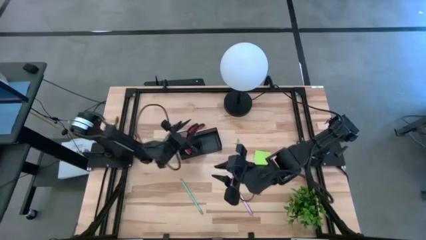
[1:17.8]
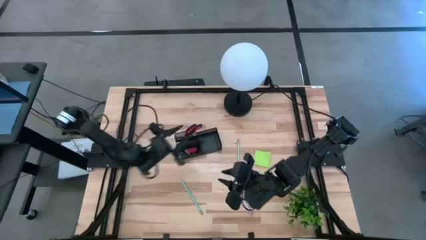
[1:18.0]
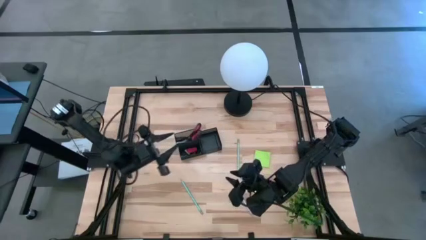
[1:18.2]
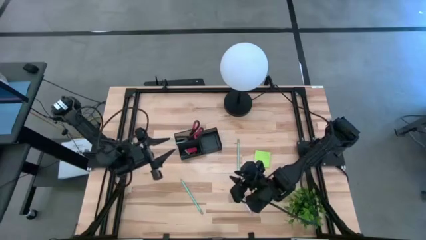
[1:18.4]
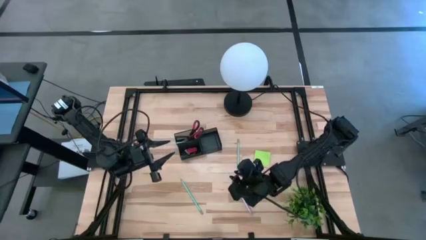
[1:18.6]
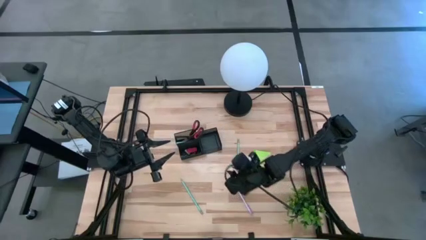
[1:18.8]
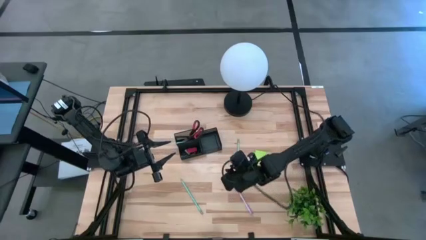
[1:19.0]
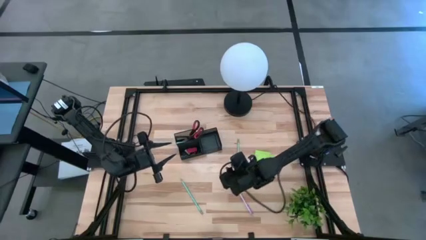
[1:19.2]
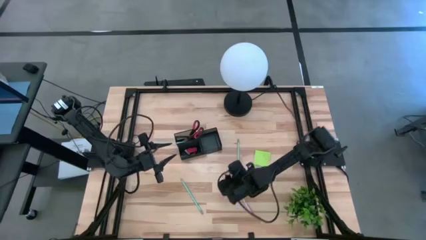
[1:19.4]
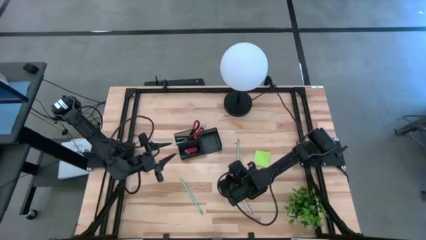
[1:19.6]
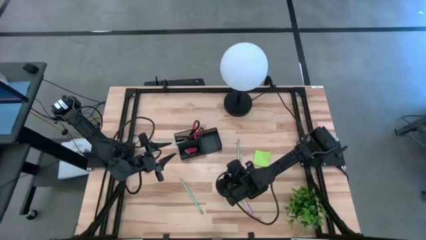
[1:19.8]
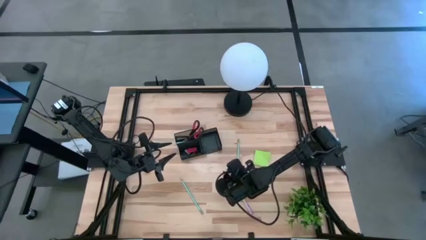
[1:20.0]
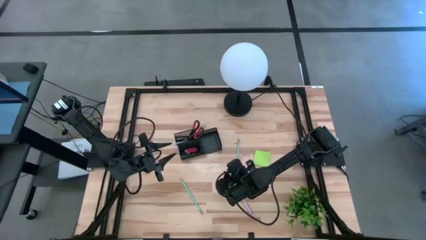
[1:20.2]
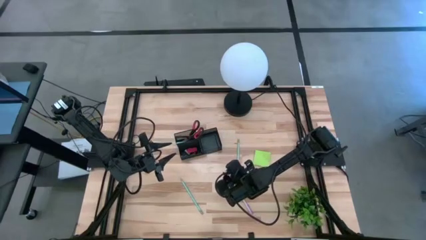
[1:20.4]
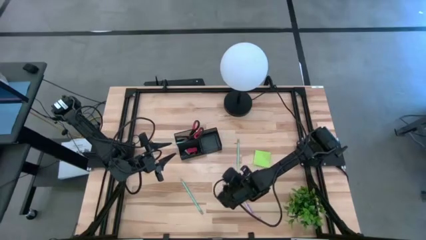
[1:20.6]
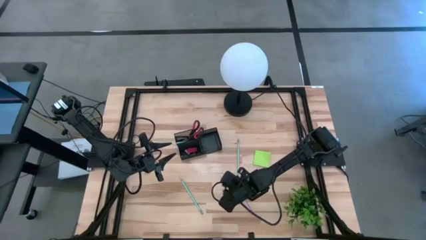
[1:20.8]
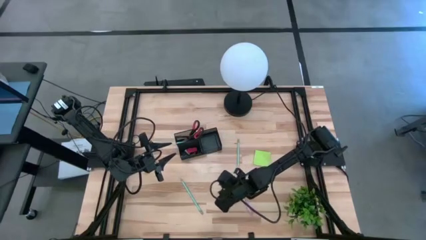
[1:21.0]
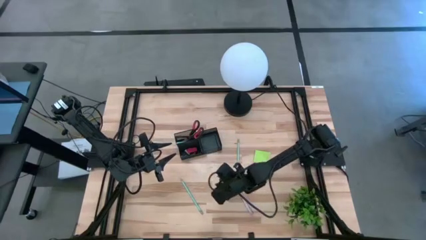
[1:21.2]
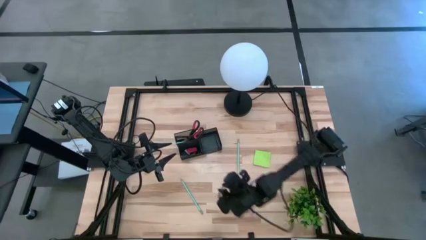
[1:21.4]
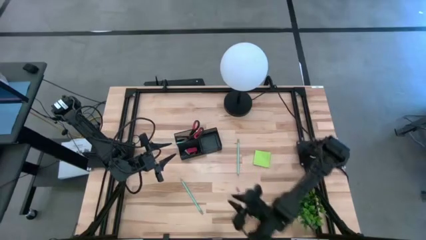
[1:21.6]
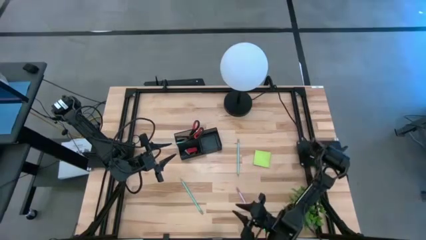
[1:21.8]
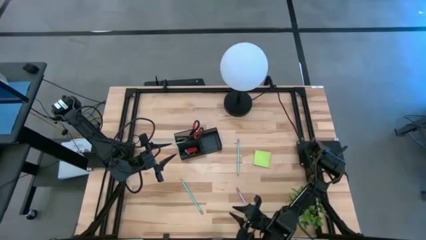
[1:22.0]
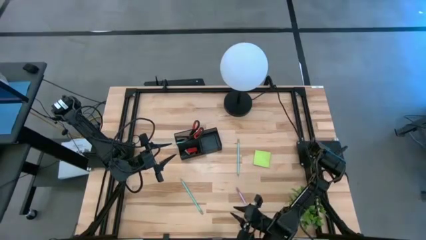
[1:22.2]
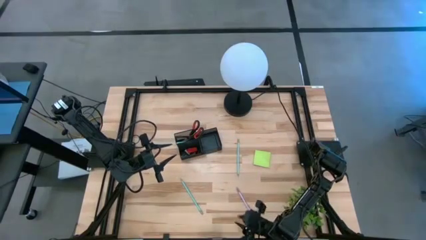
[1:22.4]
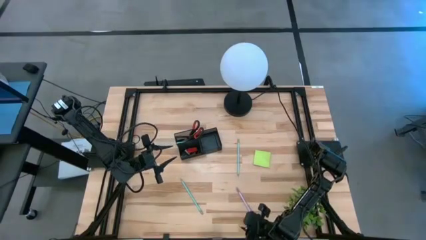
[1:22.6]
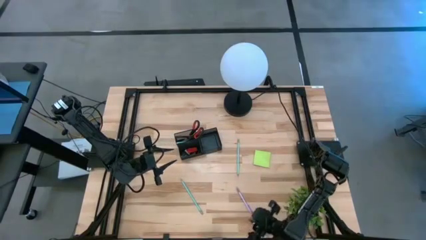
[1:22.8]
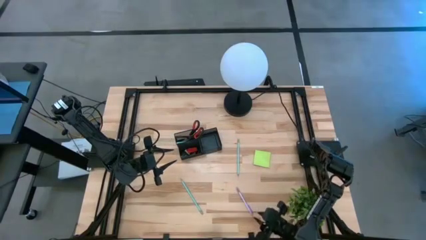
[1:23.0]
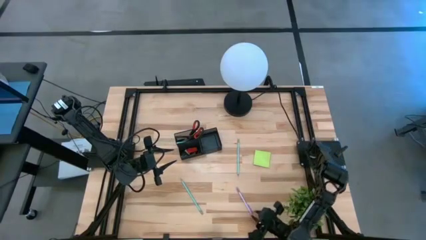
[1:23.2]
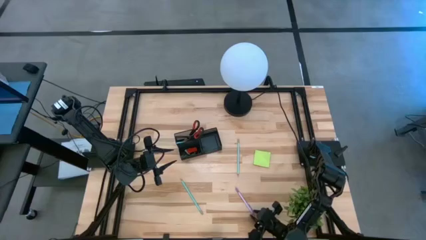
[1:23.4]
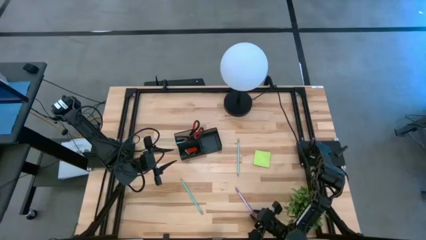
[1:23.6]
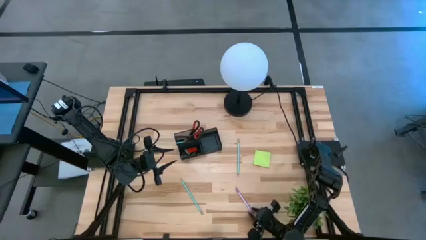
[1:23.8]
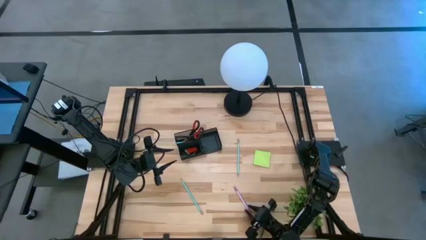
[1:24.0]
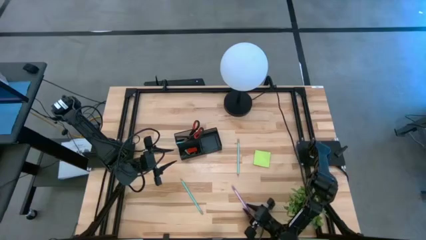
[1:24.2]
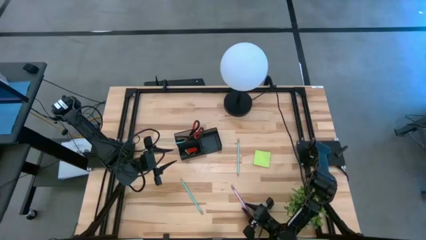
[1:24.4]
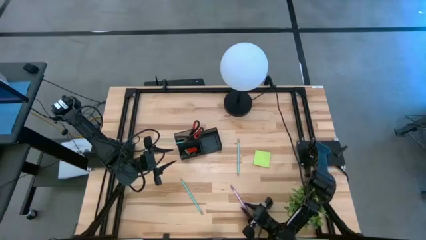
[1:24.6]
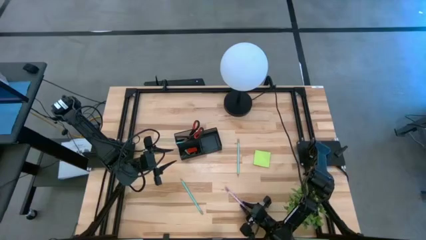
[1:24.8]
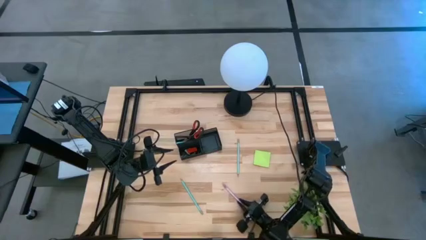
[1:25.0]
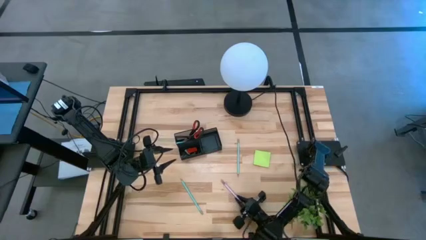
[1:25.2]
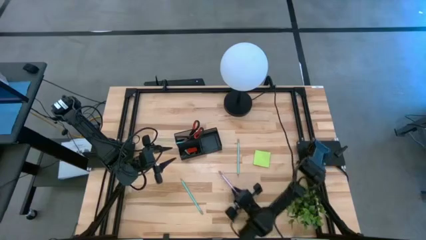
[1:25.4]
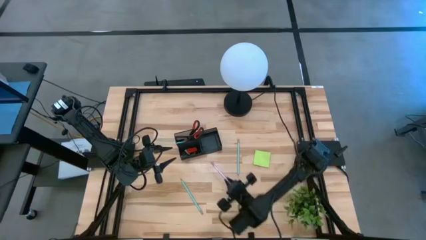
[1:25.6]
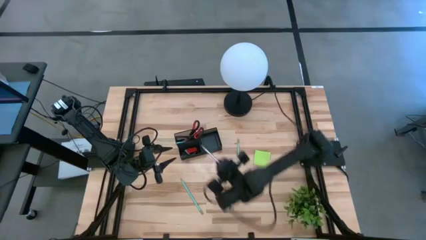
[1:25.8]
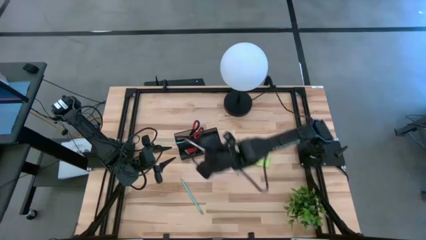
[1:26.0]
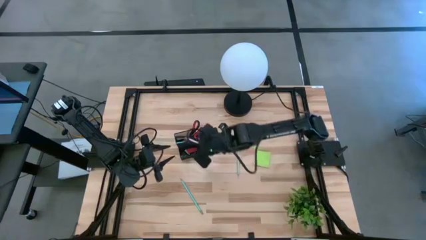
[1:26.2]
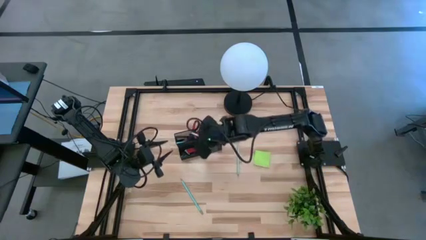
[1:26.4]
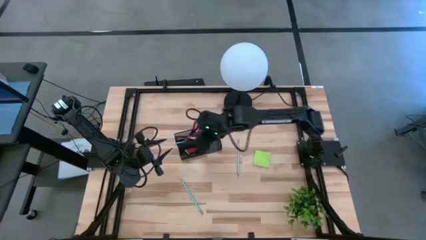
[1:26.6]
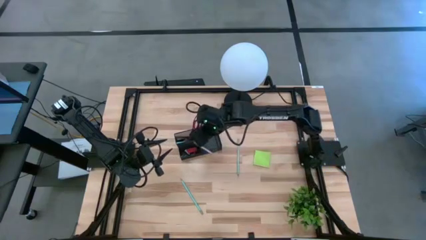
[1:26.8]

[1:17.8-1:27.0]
Task: Pick and place office supplies into organizer
Put the purple pen into the black desk organizer

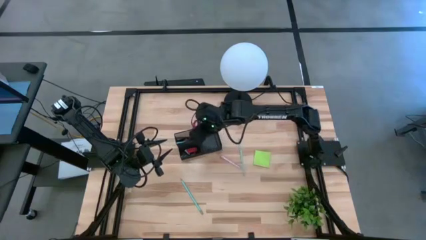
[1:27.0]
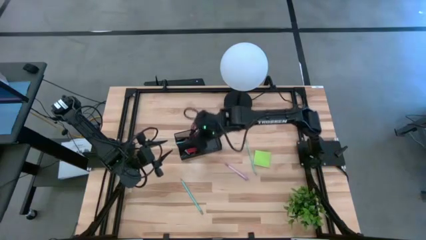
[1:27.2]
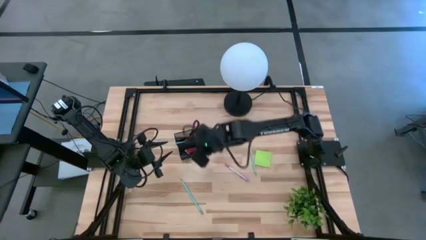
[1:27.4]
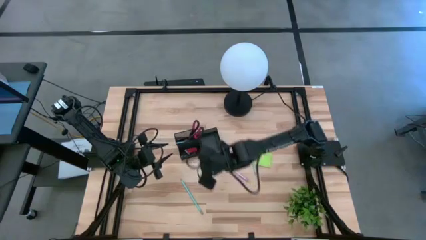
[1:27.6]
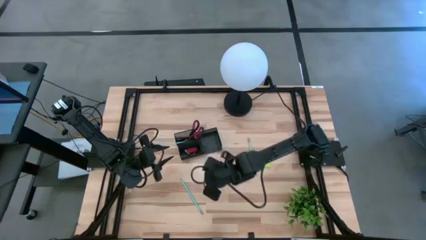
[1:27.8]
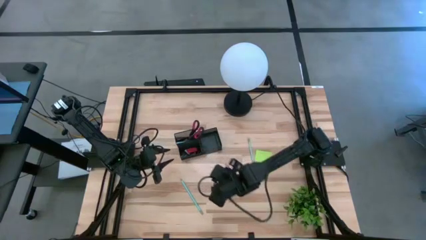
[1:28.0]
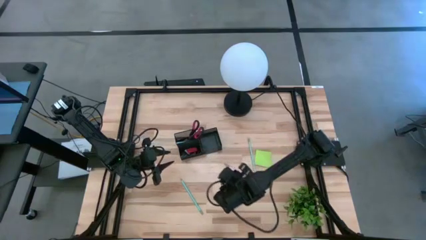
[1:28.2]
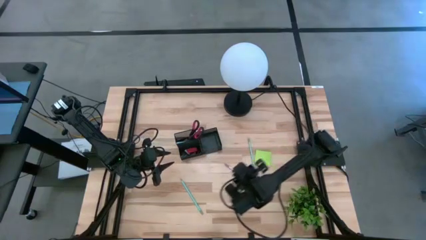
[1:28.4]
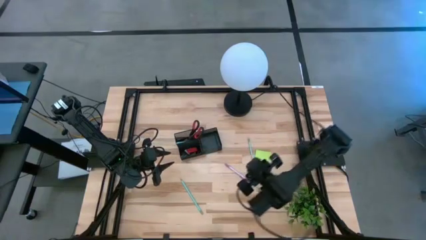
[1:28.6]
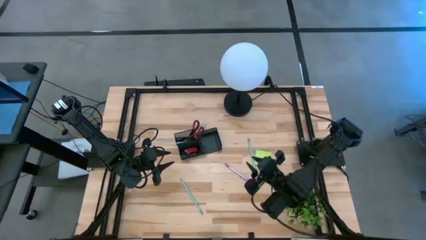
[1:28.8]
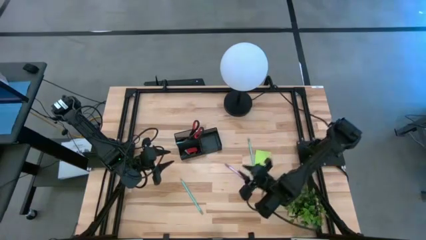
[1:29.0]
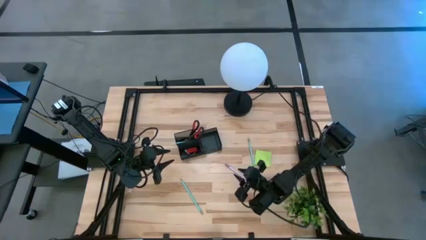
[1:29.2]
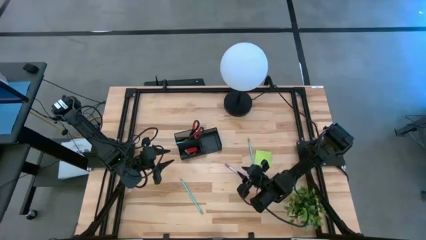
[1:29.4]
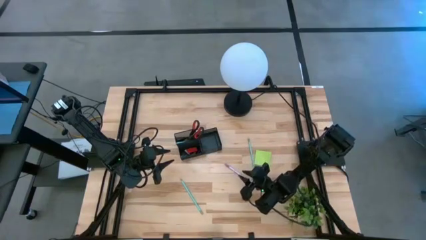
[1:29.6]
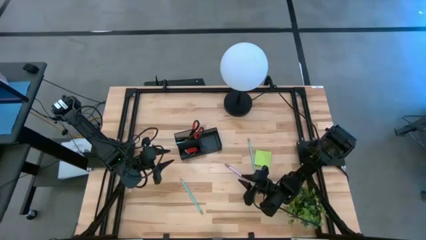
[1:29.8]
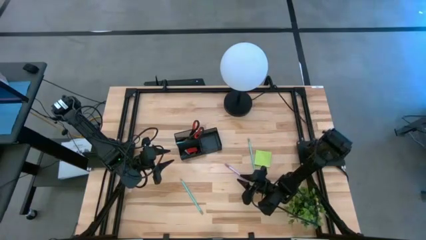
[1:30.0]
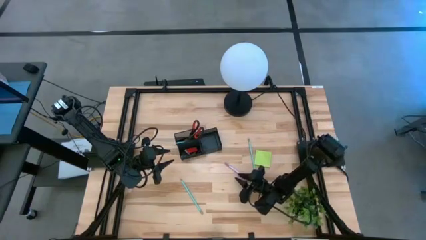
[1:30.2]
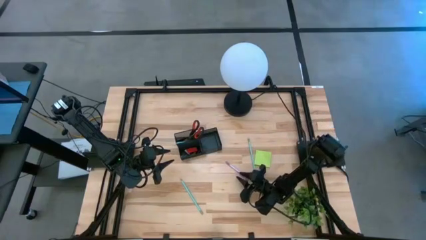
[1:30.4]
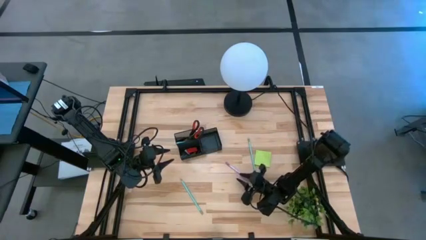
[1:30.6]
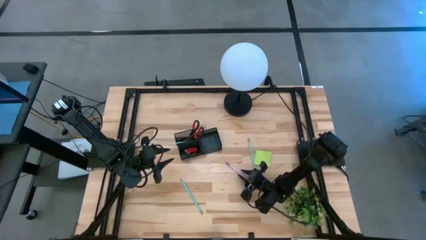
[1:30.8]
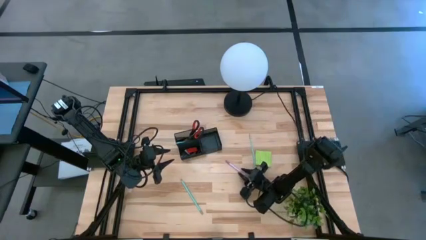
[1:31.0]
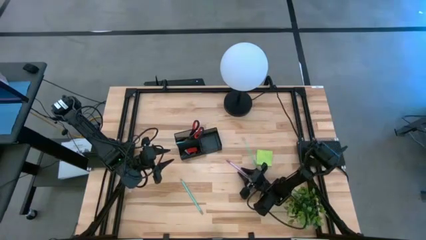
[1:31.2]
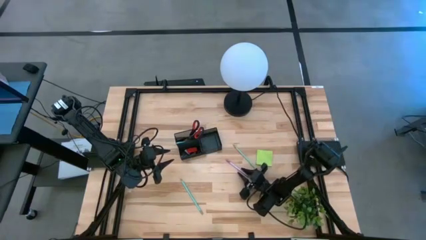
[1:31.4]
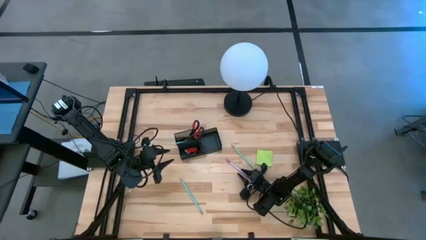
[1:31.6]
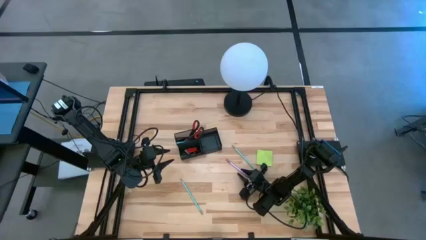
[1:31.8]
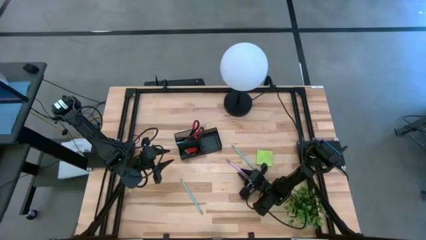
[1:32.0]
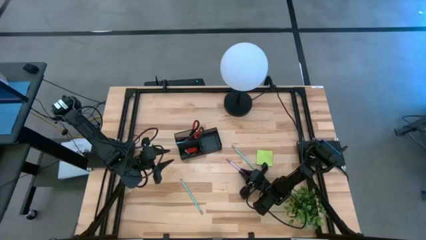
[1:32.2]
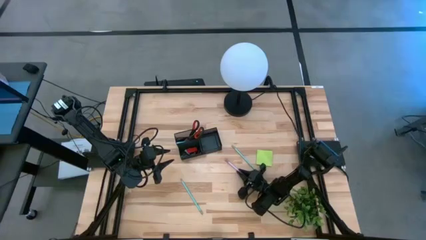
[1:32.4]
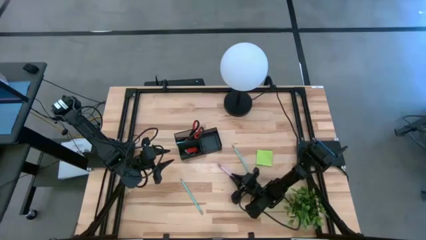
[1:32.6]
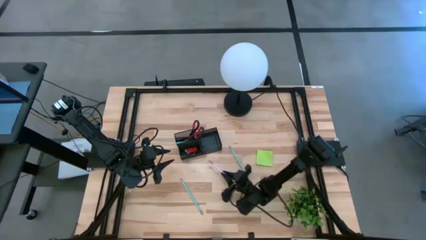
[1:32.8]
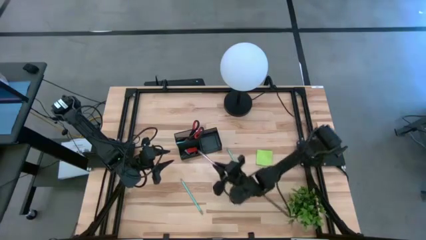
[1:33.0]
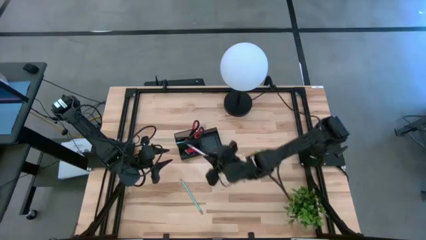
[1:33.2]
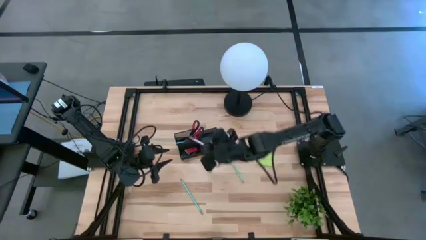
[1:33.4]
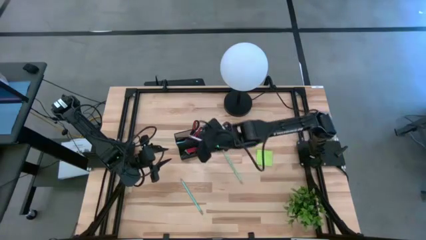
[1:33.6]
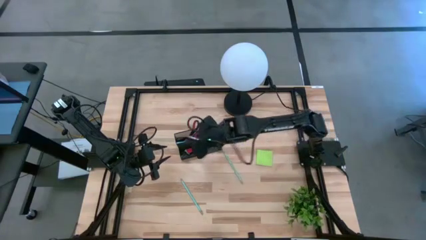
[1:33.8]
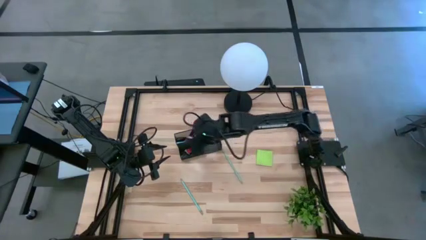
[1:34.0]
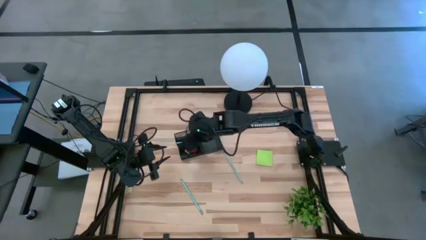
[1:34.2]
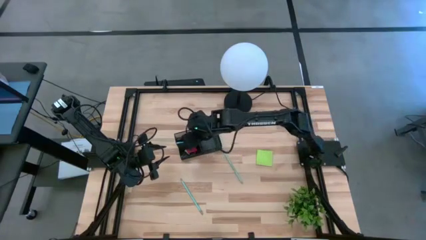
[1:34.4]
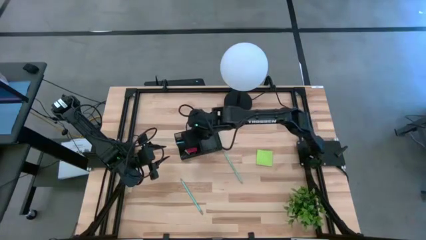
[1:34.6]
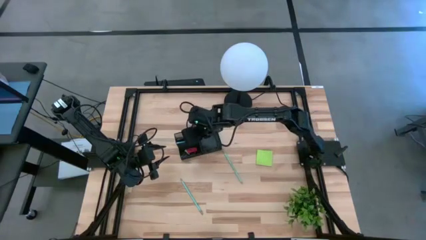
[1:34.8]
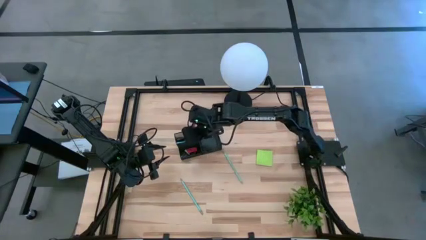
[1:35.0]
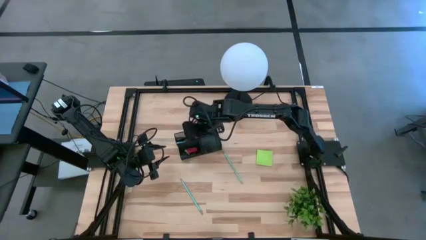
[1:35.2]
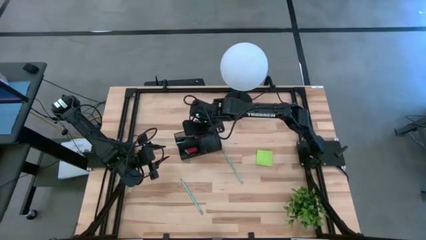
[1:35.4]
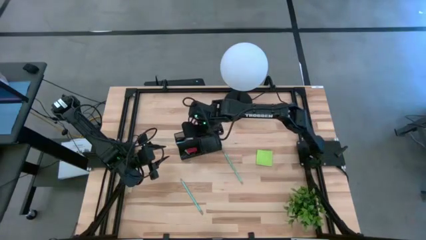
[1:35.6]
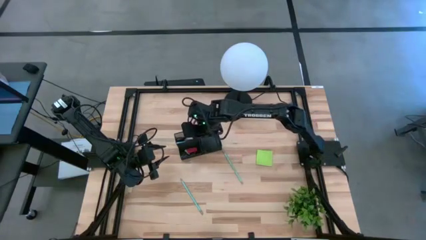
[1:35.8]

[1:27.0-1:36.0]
Put the purple pen into the black desk organizer
